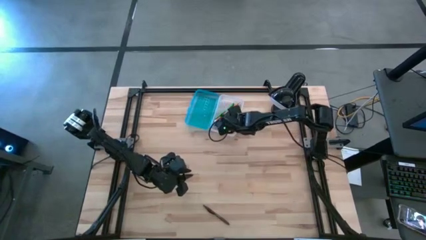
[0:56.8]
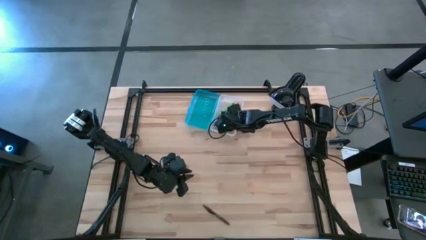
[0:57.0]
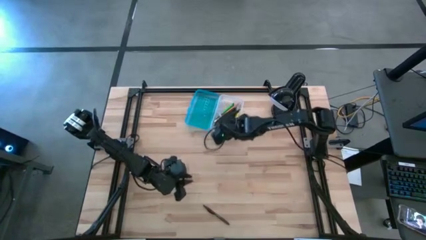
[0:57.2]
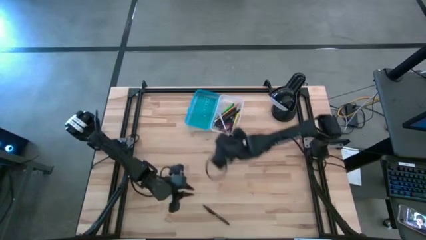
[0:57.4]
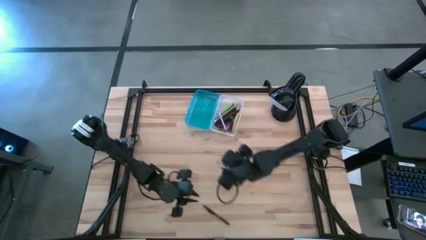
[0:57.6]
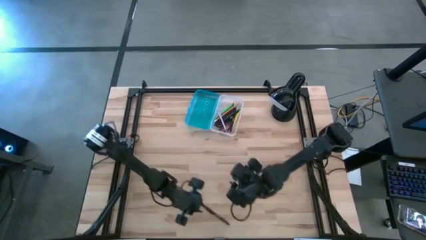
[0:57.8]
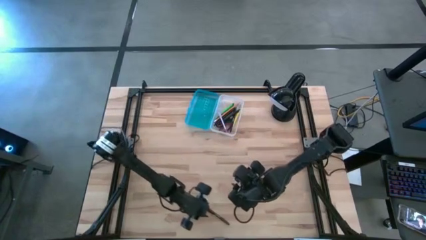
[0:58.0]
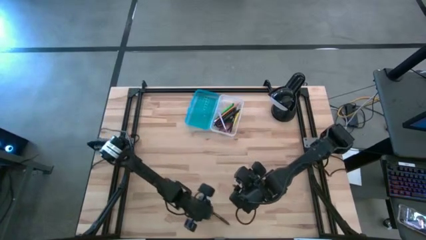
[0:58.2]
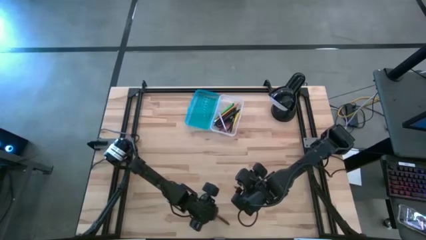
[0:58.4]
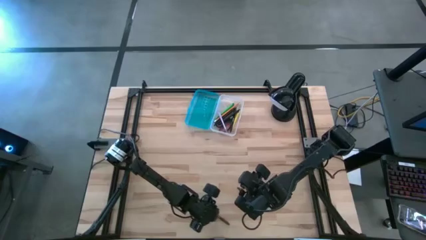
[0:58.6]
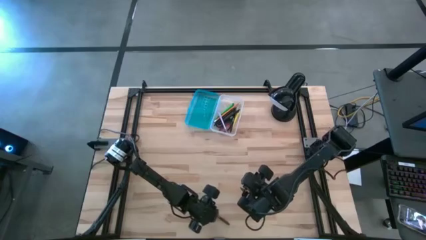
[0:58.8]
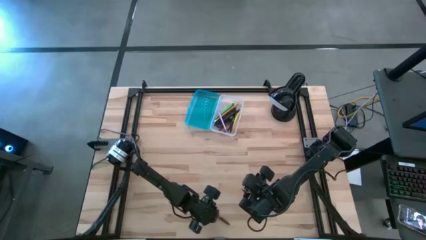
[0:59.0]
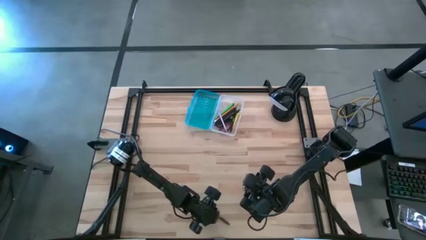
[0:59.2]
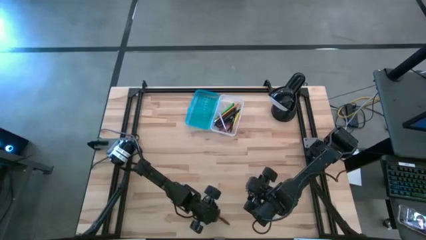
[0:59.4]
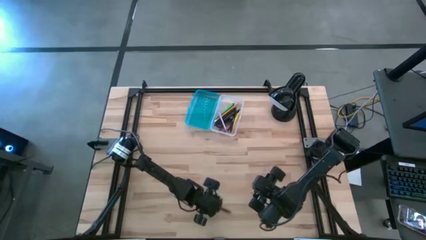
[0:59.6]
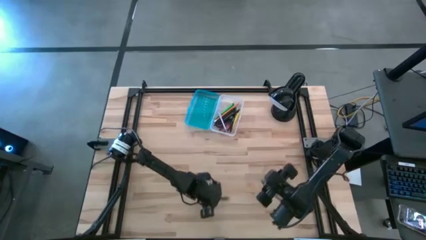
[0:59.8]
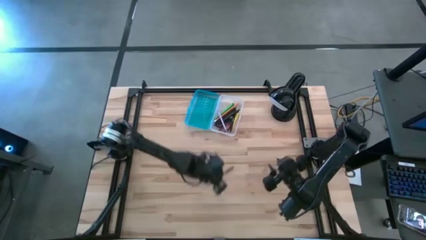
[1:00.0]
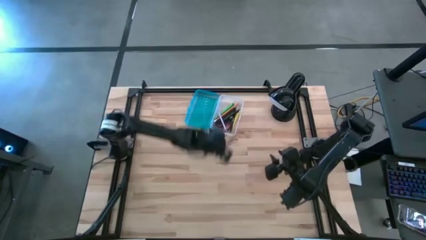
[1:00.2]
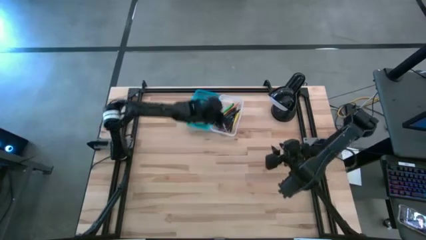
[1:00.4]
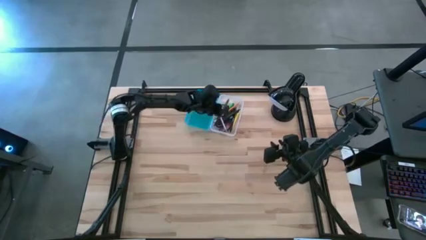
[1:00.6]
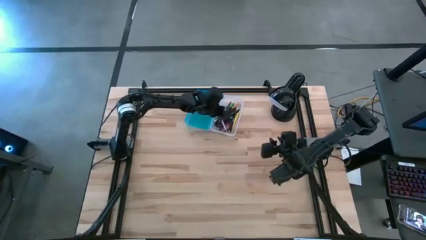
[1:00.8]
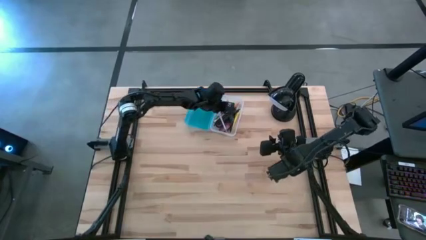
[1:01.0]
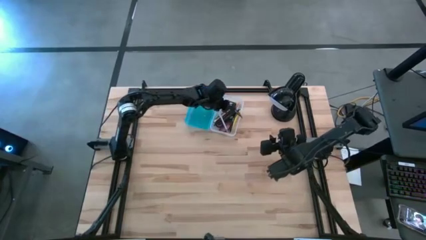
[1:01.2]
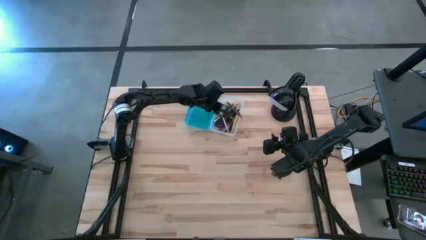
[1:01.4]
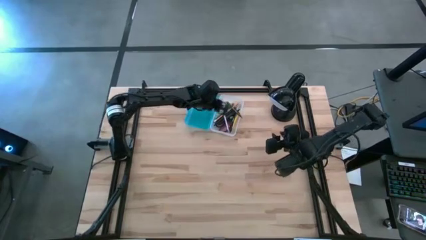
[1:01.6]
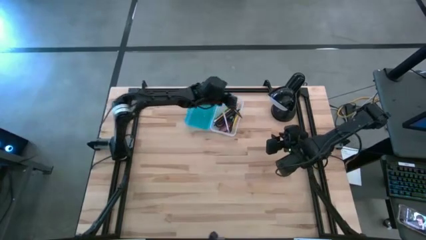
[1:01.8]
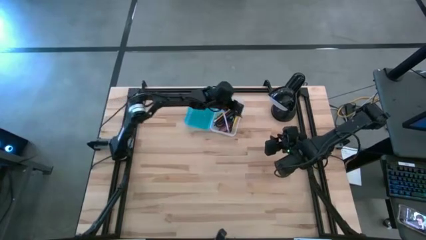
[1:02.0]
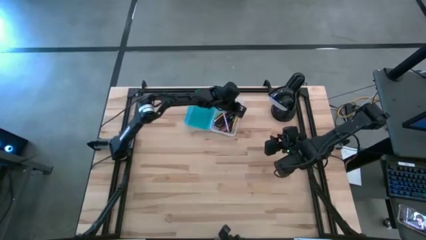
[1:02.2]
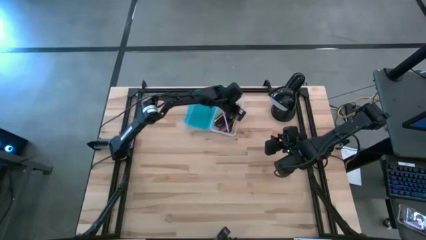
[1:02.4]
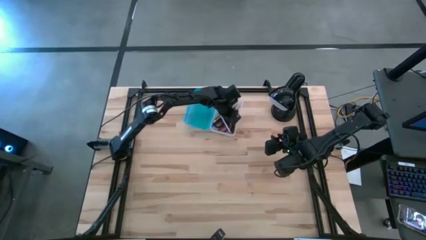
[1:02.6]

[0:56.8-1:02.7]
Task: Pick & place school supplies into a supply box
Put the brown pen into the blue supply box

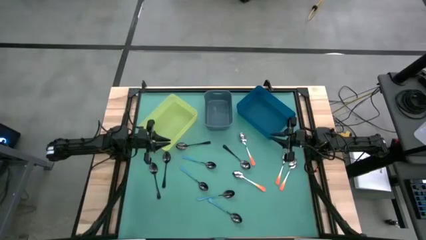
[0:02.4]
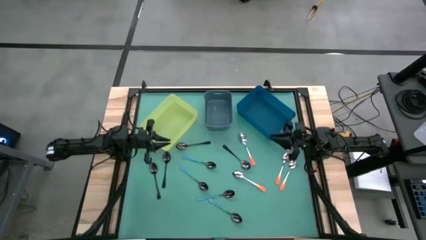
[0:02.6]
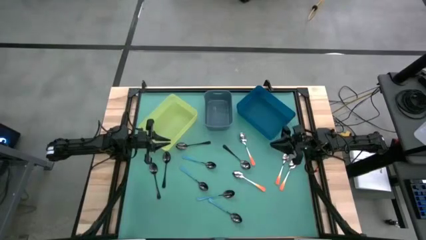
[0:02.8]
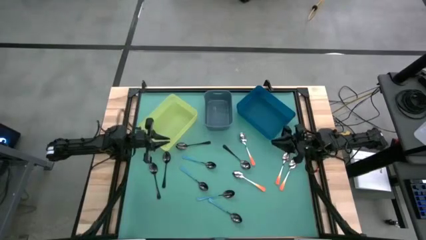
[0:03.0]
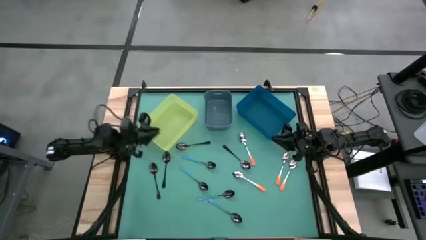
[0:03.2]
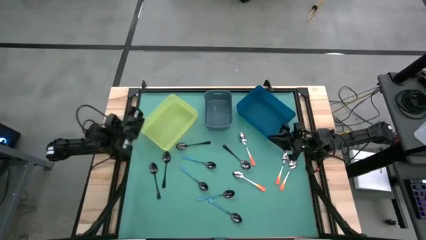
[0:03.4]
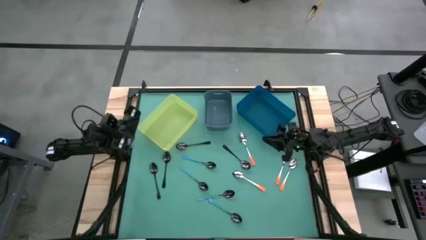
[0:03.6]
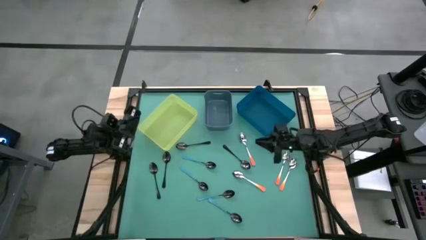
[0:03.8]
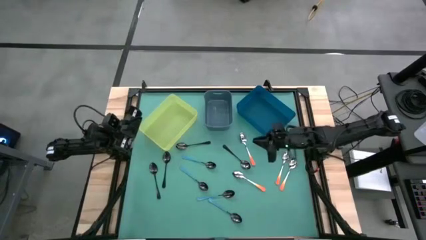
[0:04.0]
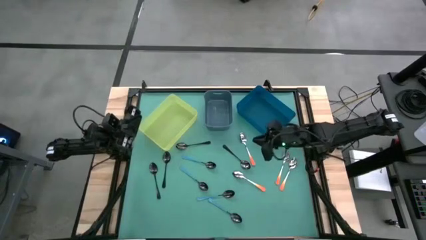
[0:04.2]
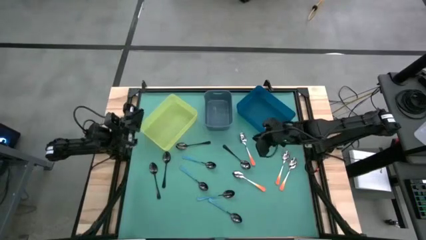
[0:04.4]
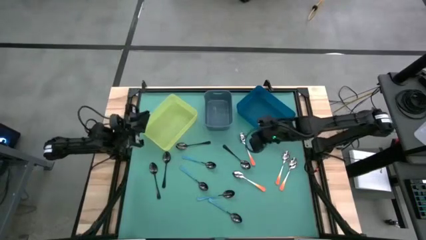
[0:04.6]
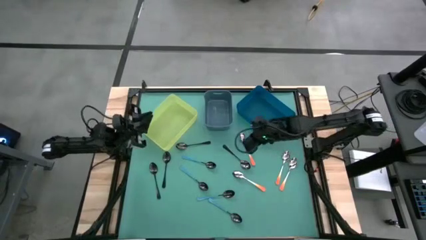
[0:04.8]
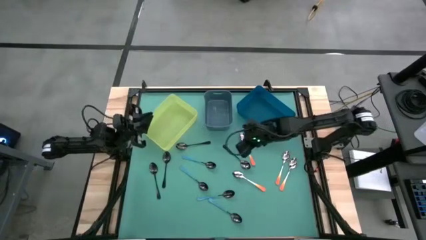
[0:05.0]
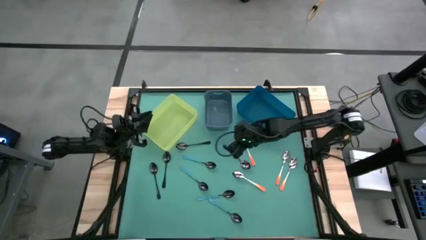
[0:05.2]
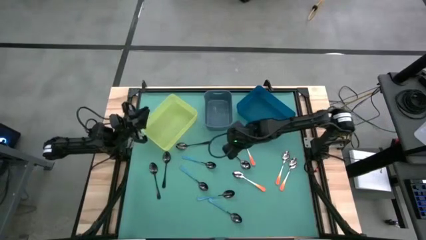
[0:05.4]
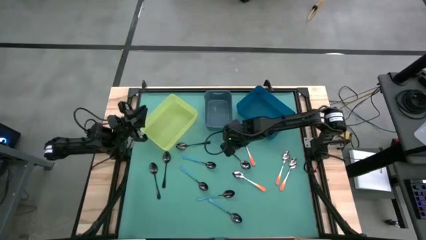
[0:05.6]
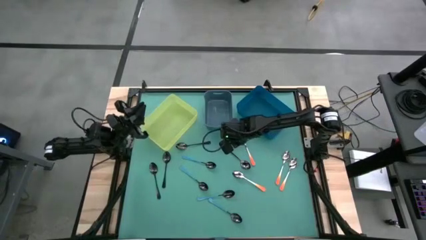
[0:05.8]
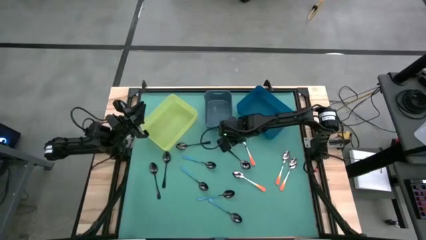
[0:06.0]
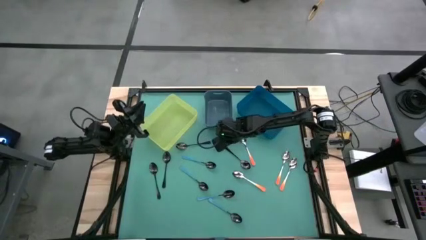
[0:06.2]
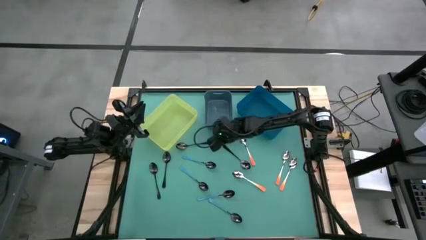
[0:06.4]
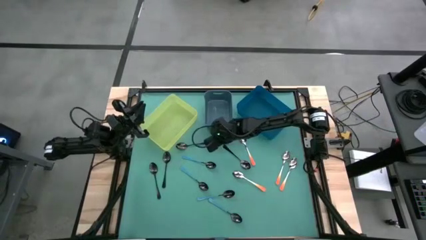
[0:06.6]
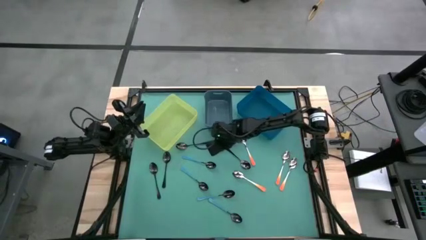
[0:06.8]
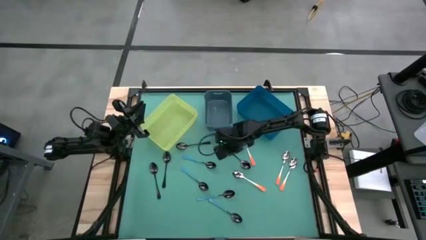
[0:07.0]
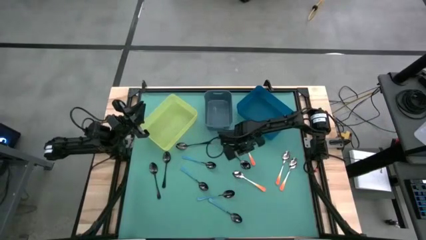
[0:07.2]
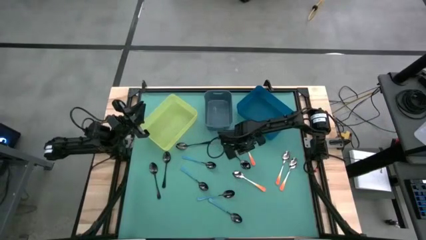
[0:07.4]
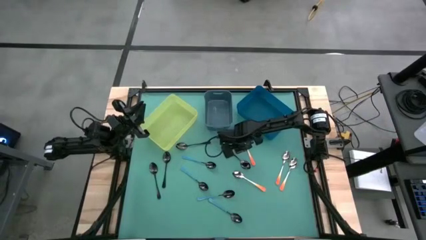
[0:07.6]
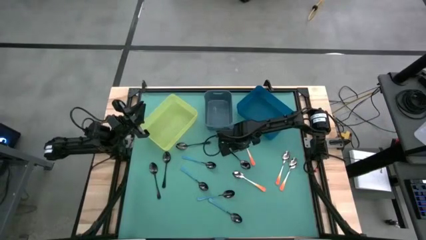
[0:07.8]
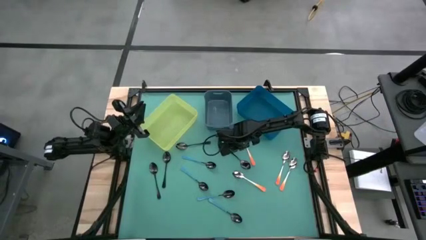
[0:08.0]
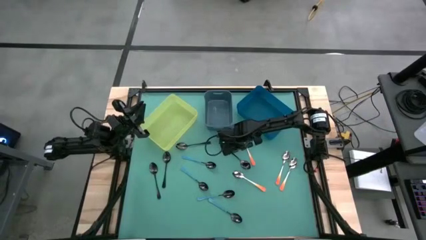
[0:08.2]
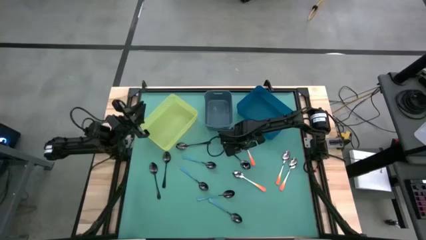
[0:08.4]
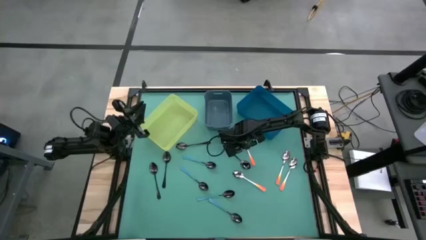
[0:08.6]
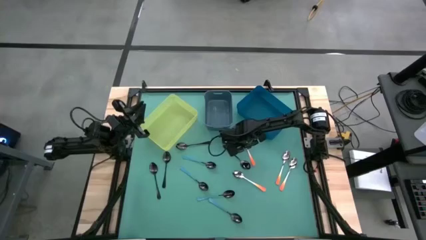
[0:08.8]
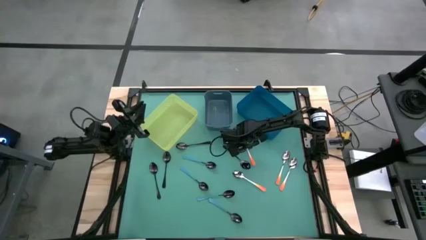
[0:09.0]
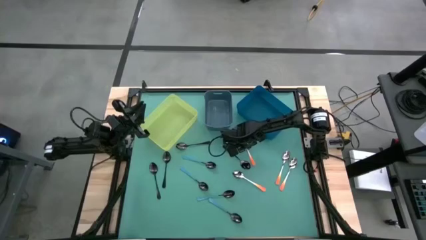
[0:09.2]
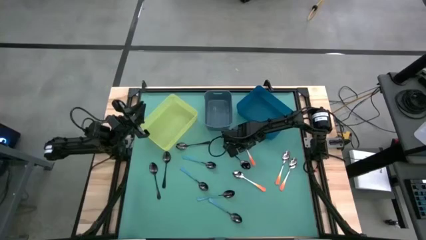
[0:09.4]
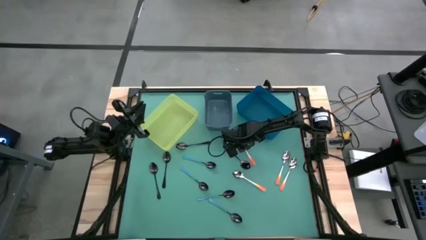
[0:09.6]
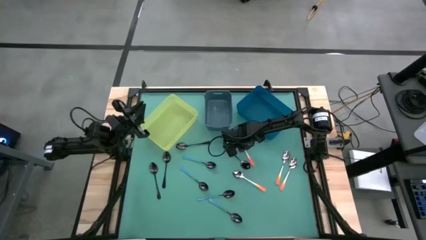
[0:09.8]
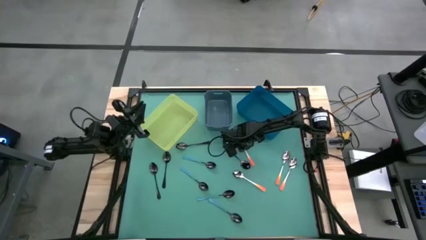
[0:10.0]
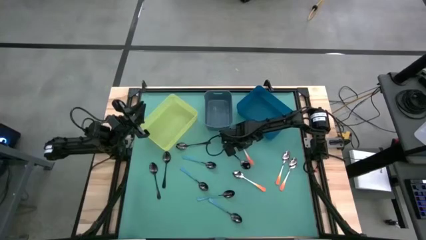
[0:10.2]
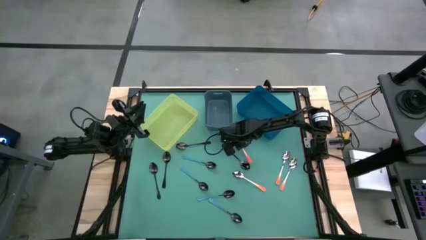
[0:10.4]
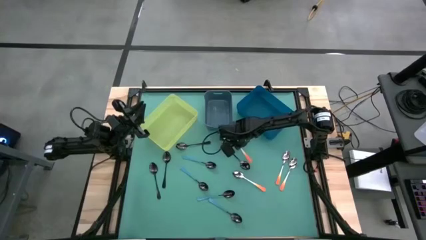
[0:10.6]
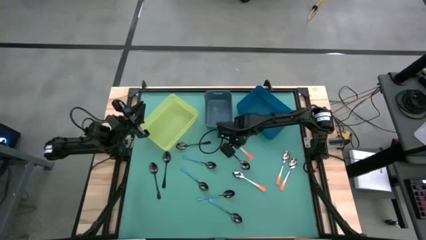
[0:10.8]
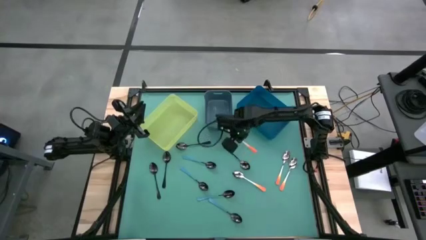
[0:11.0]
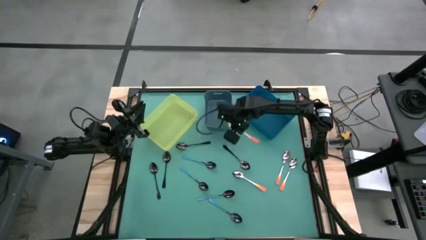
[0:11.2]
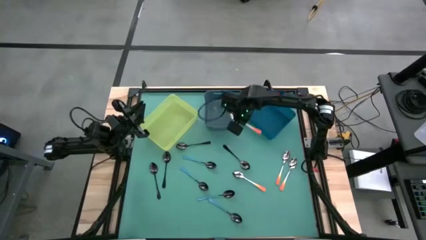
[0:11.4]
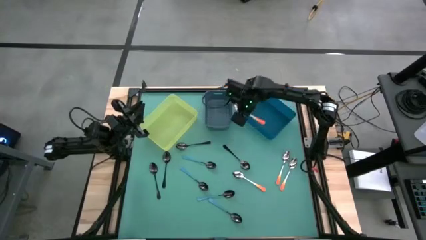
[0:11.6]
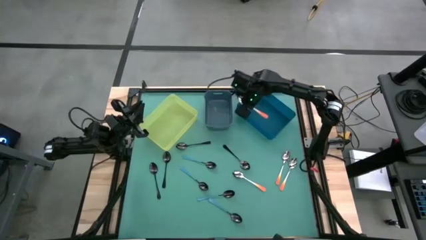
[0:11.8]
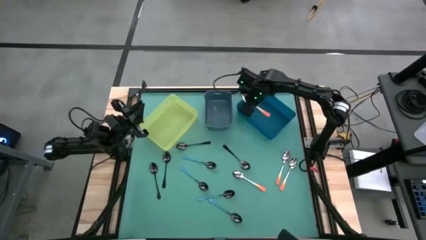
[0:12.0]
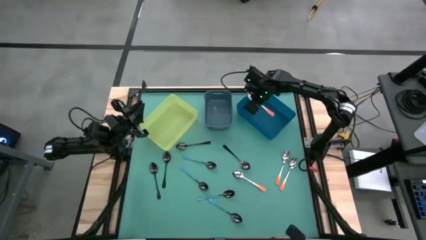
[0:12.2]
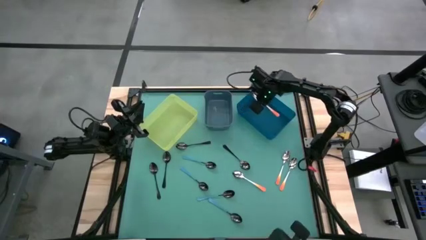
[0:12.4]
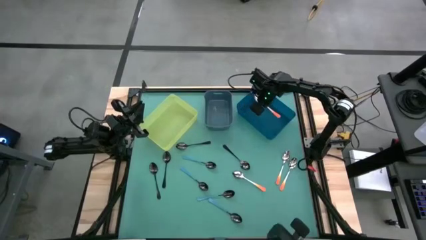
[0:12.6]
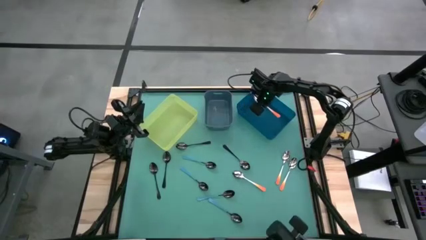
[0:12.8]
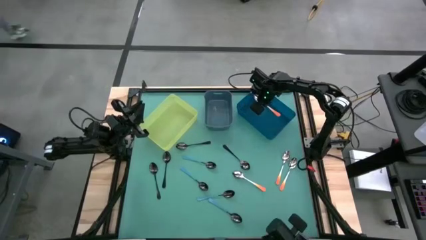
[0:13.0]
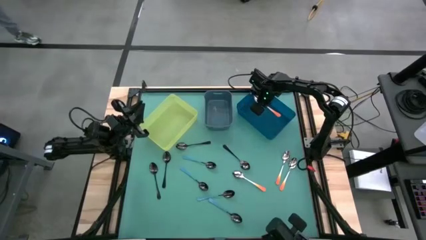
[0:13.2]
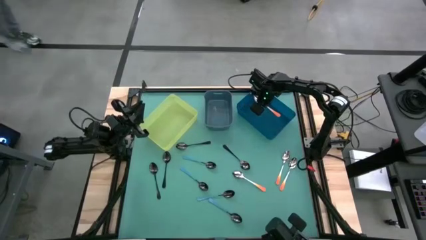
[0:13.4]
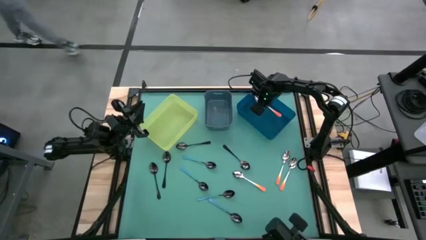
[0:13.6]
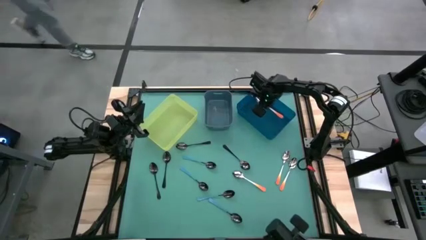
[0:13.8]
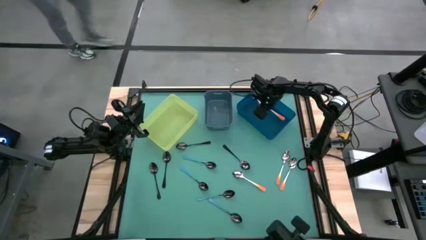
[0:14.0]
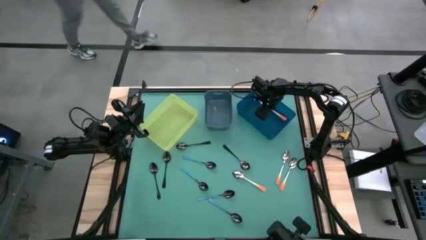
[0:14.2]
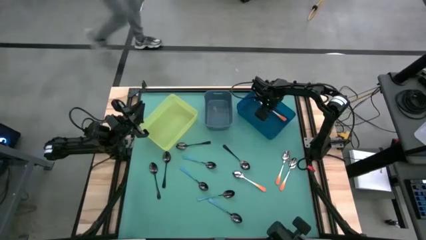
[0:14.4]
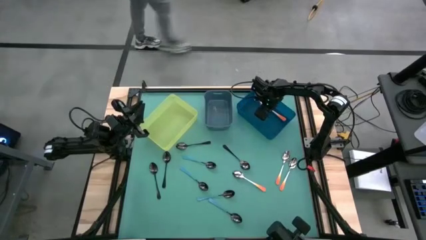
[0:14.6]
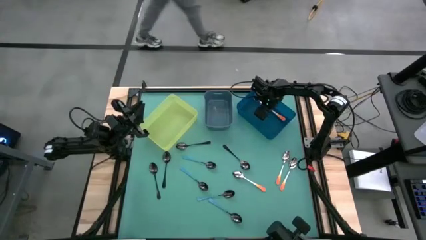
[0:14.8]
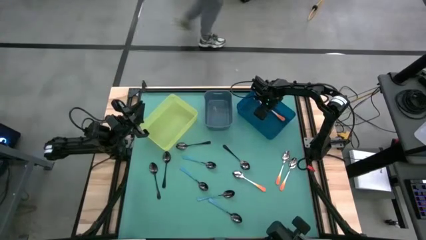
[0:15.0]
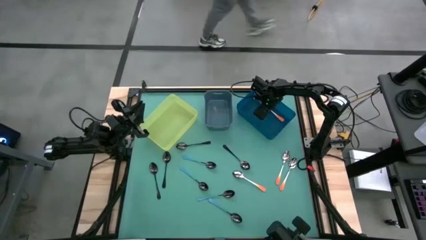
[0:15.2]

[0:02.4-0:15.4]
Task: Sort silverware by color (type)
Put the orange spoon into the blue bin
